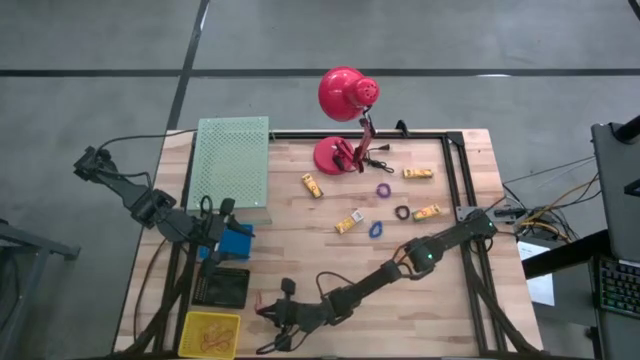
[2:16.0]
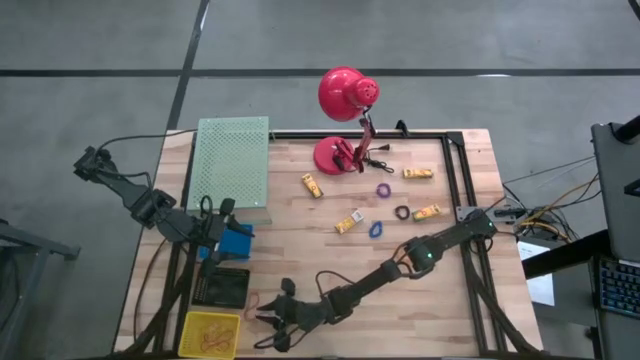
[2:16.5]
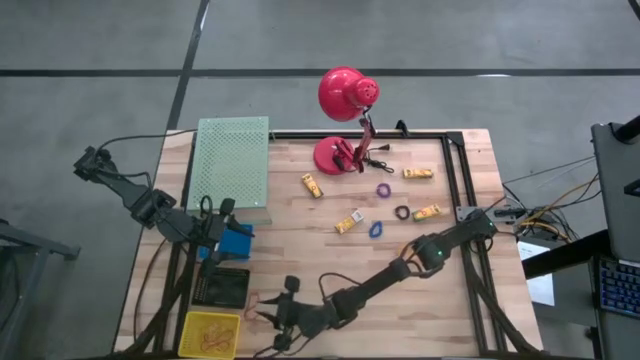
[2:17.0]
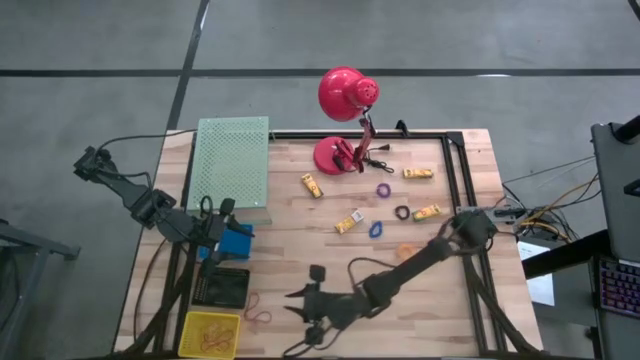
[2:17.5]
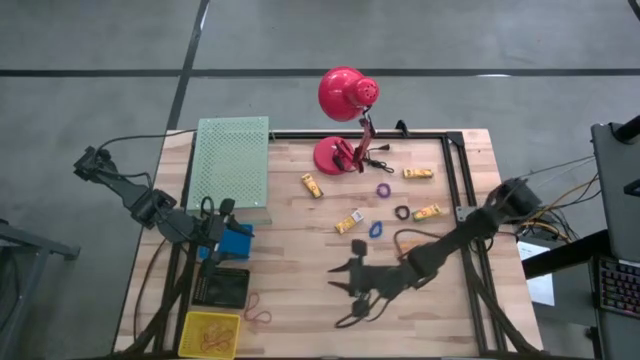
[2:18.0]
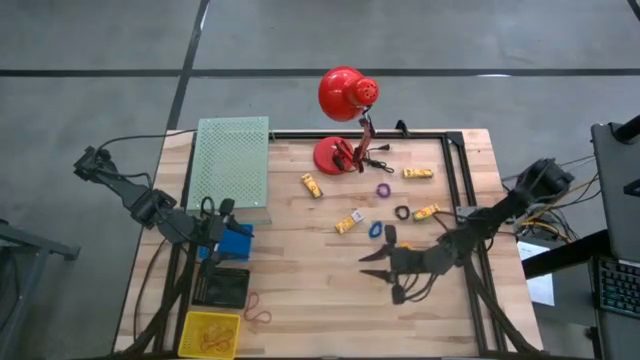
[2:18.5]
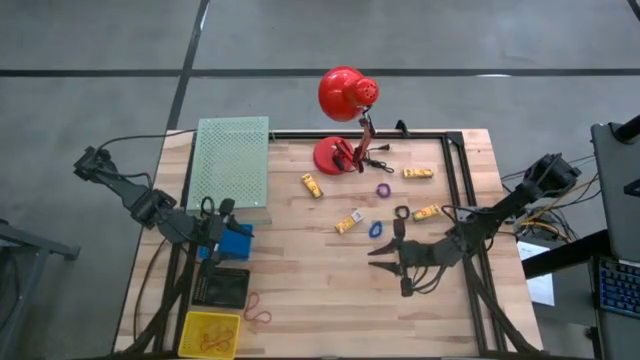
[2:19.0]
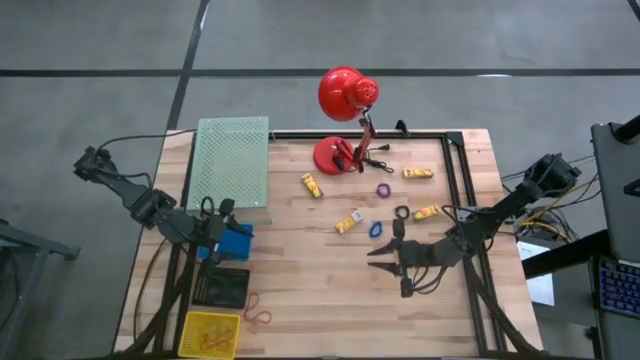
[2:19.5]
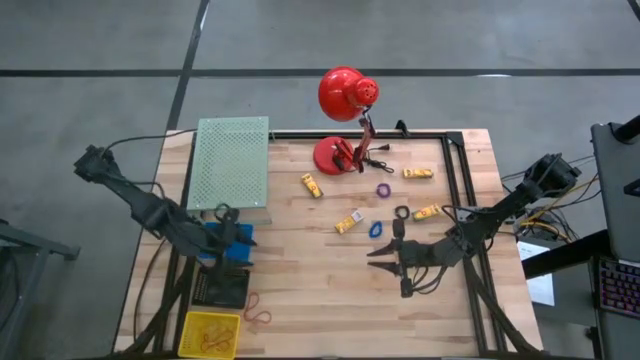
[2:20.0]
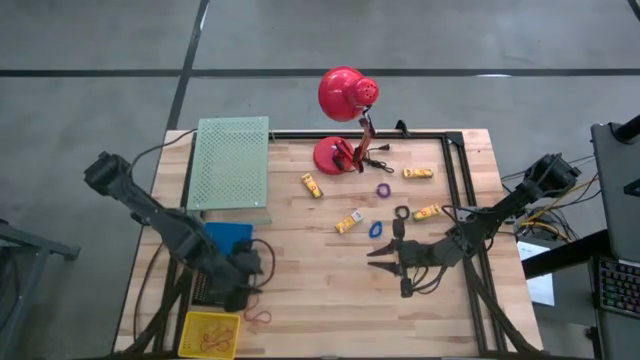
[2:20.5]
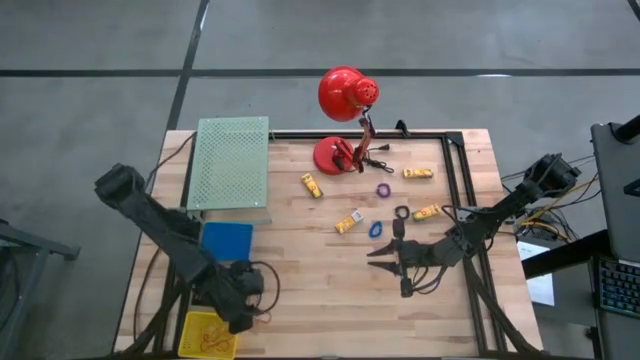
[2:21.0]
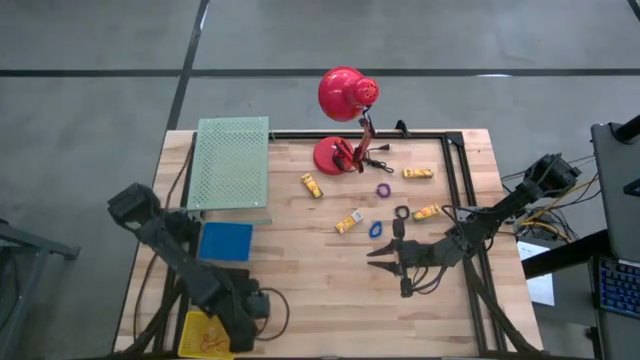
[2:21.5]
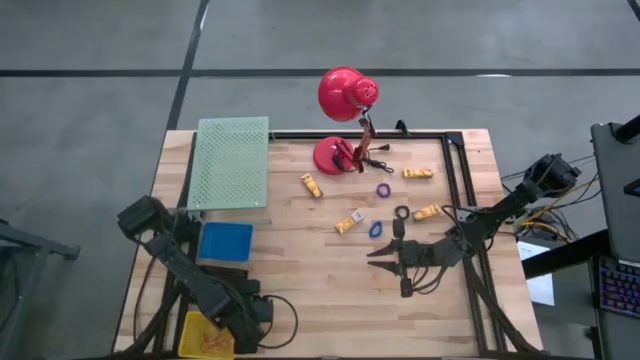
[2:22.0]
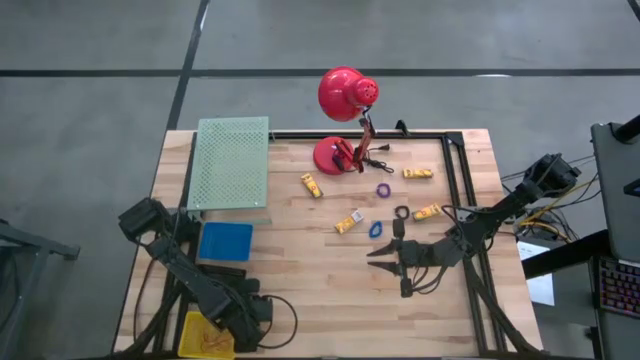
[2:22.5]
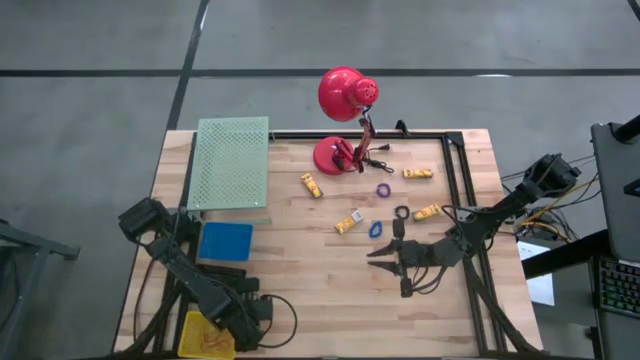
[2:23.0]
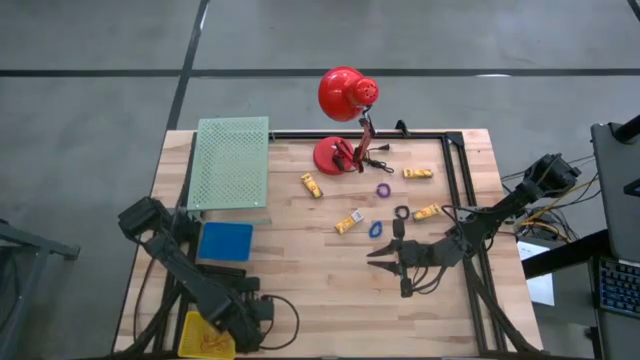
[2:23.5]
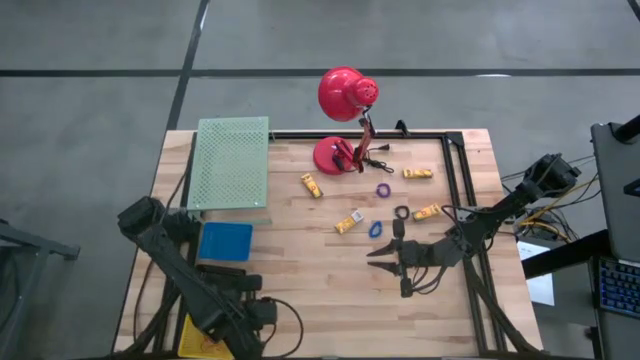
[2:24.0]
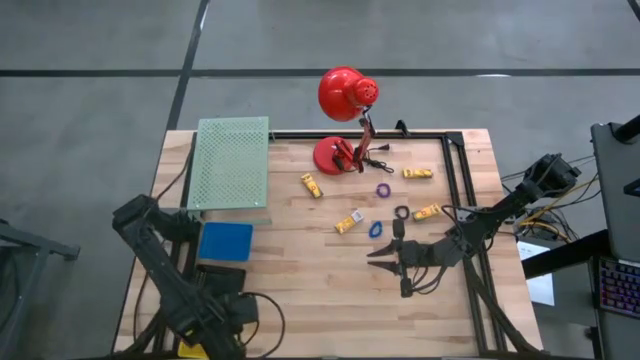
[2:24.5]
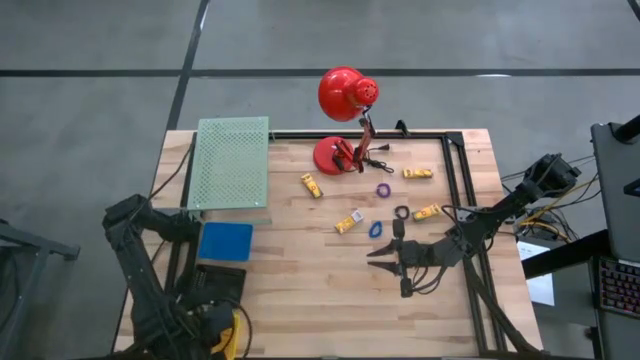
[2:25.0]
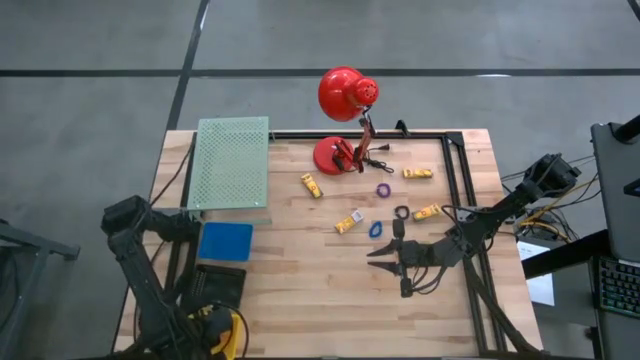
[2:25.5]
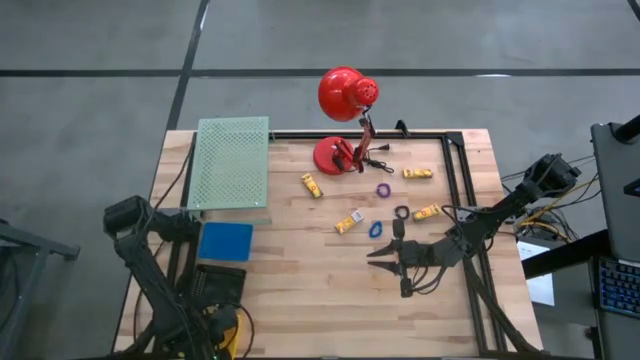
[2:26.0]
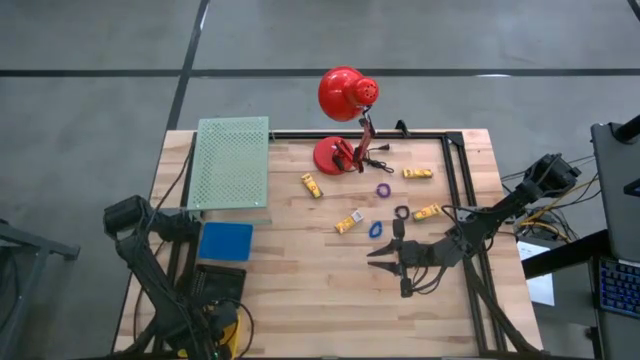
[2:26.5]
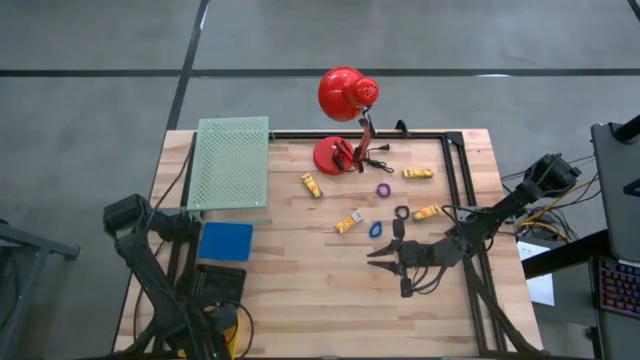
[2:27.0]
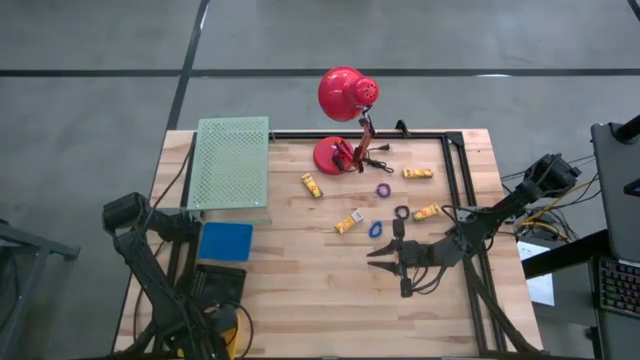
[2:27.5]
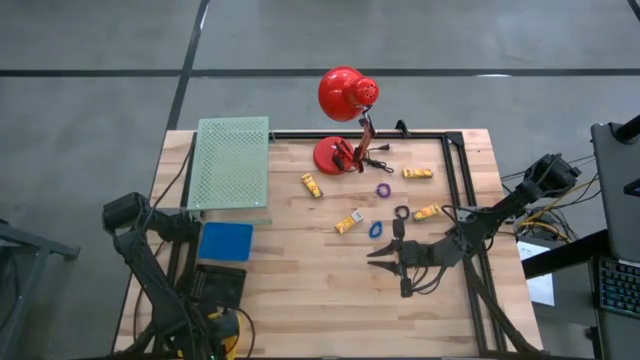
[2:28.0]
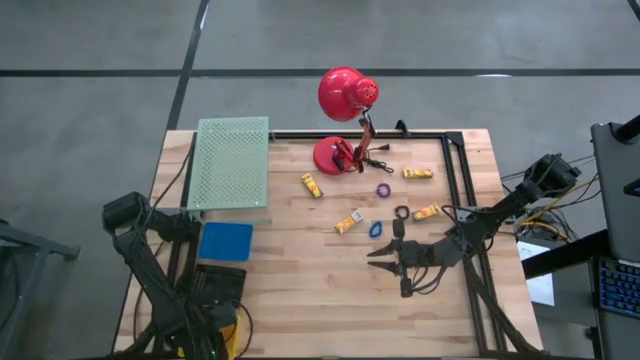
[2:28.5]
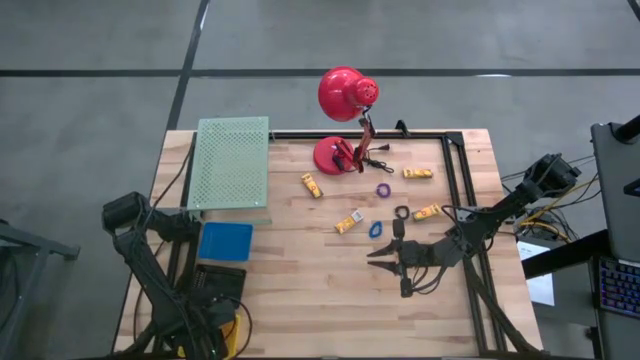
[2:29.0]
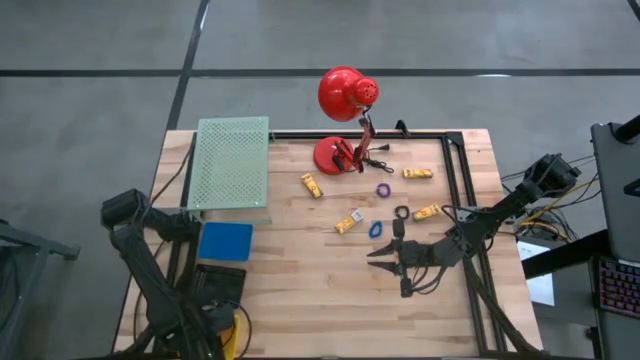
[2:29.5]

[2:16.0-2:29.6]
Task: Pick & Place Office Desk Supplies
Put the red rubber band into the yellow bin

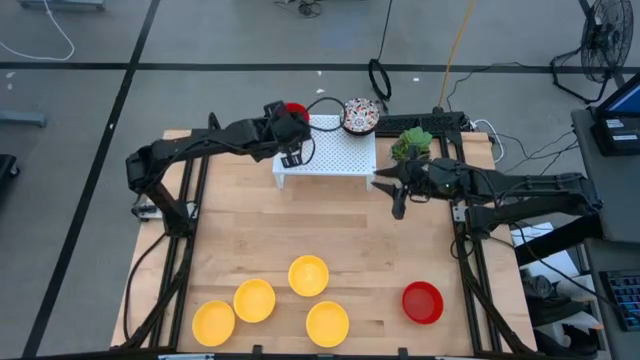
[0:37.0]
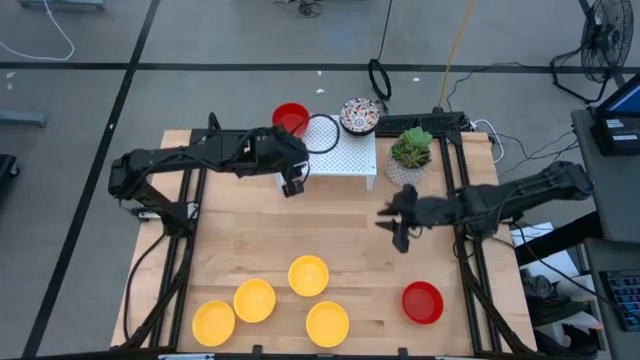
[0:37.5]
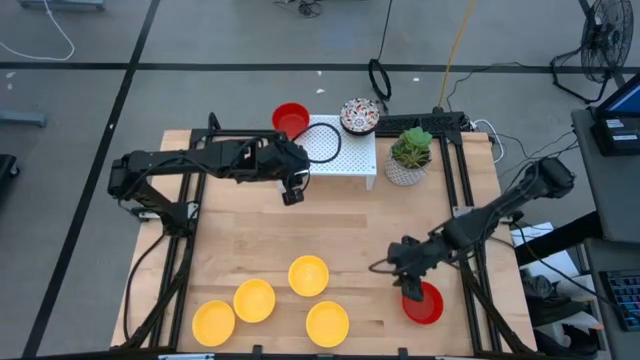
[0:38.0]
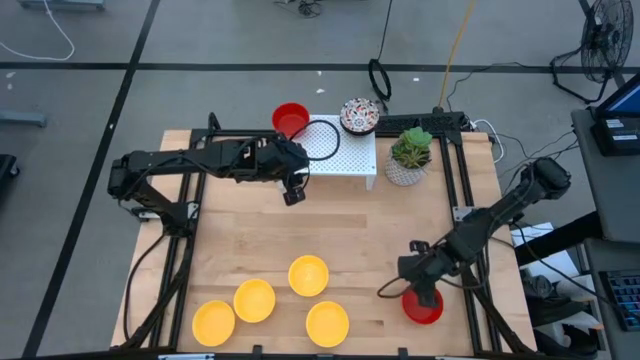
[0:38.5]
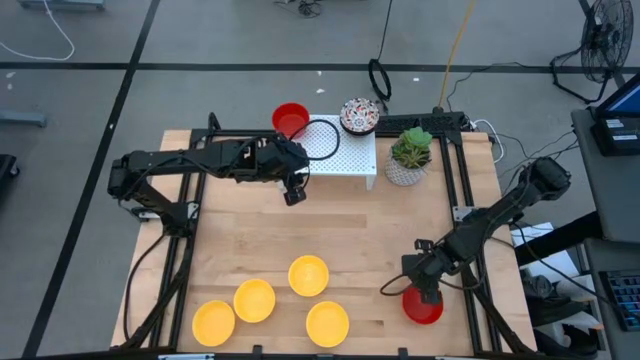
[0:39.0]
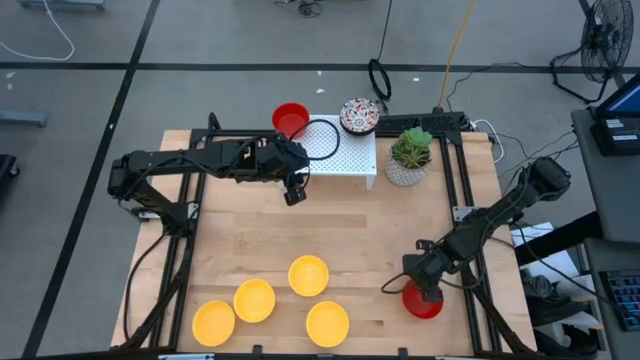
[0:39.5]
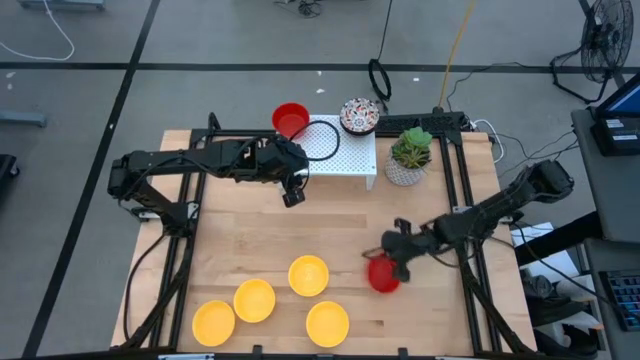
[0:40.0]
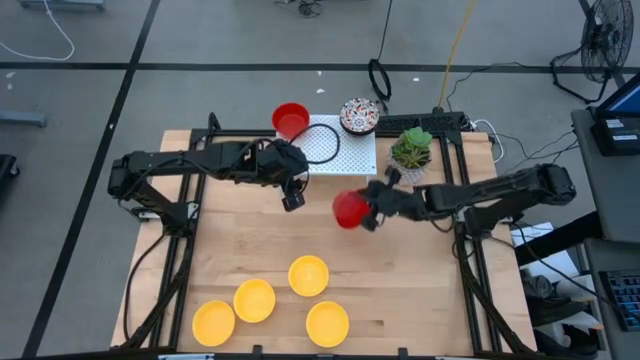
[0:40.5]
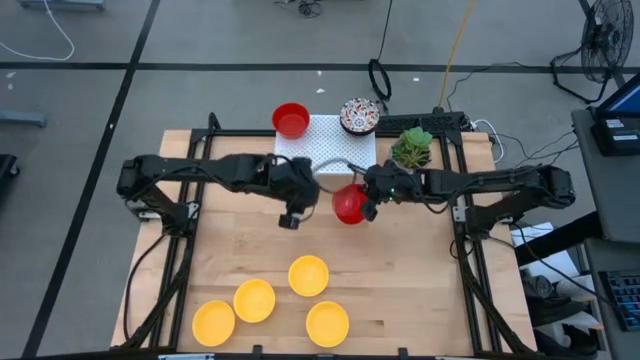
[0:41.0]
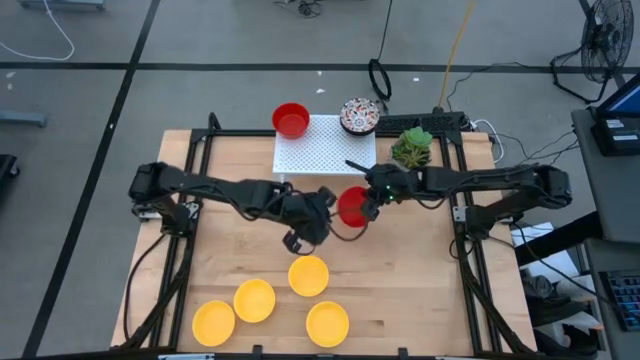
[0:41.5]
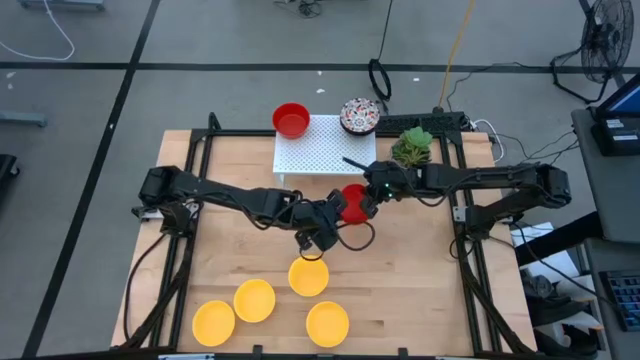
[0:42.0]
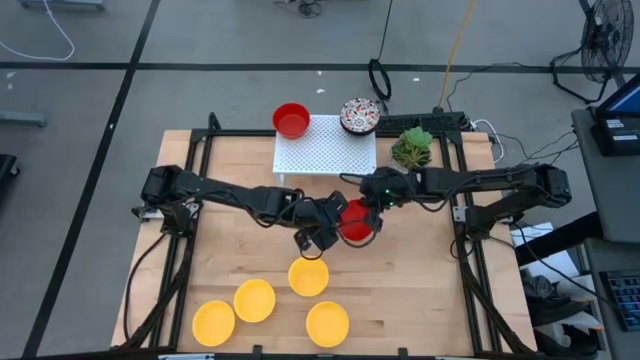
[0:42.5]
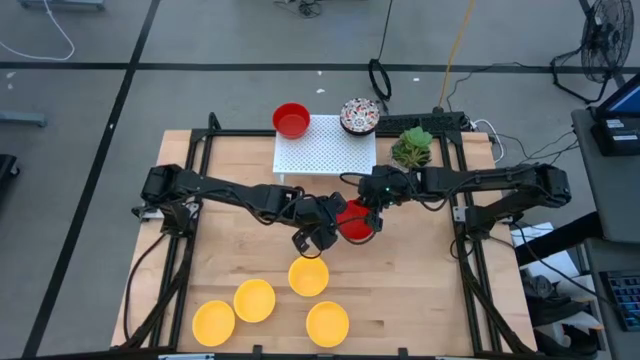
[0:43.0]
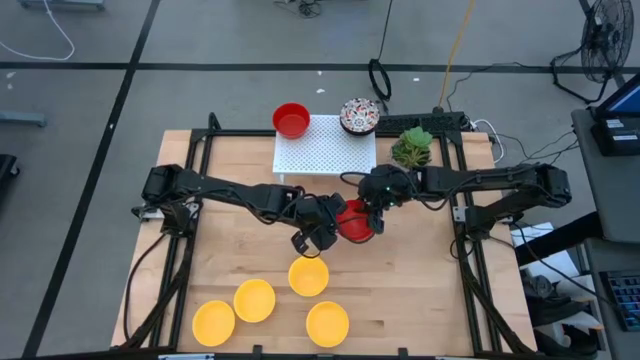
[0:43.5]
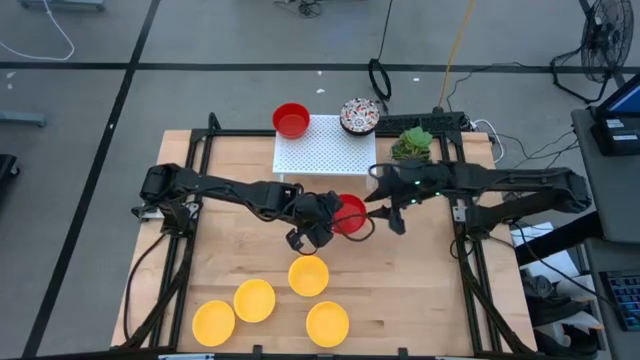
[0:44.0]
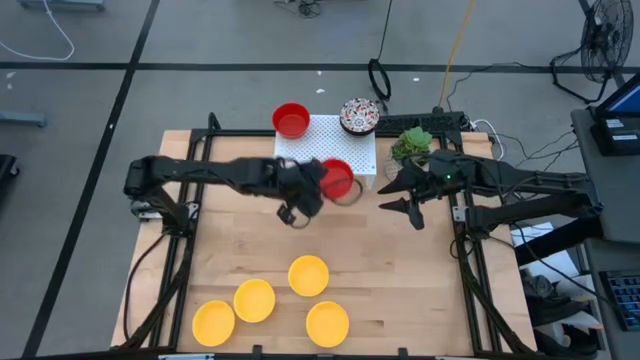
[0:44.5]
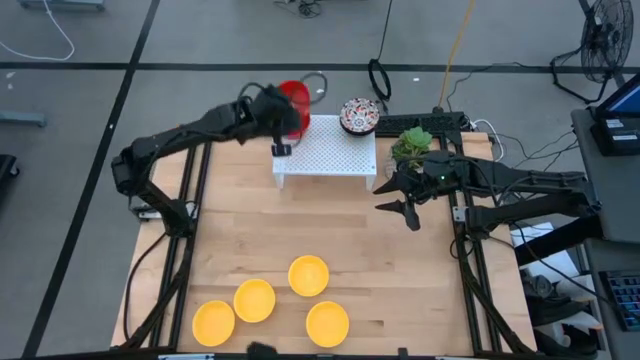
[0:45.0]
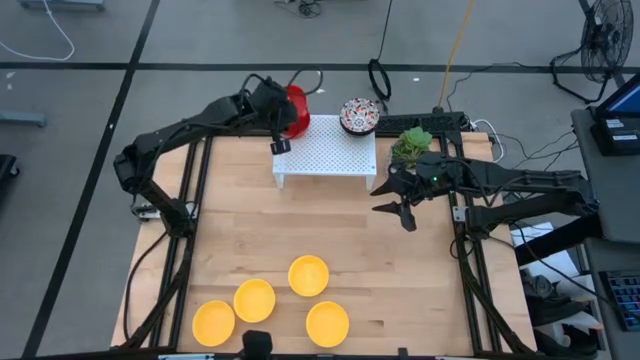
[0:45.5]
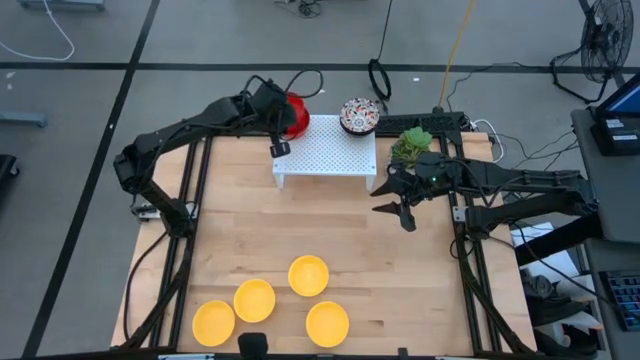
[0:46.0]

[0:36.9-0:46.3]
Task: Pick & Place Mini bowls
Stack the red bowl on the red bowl on the shelf
